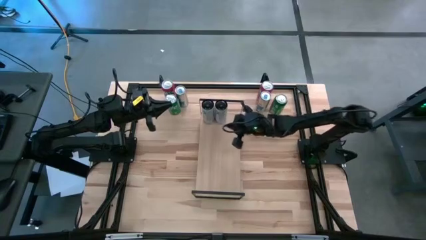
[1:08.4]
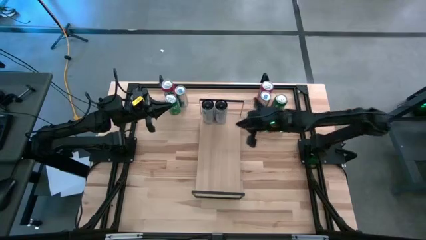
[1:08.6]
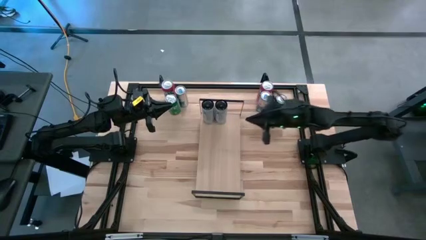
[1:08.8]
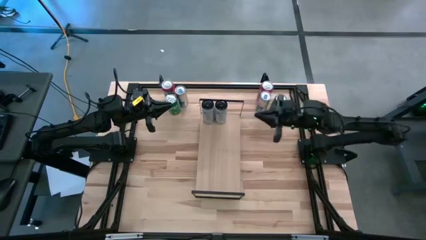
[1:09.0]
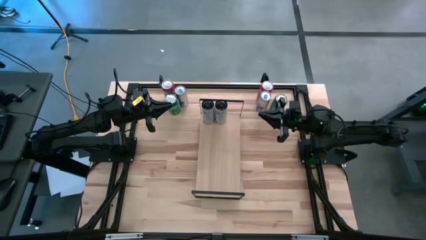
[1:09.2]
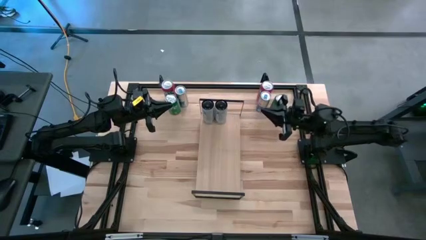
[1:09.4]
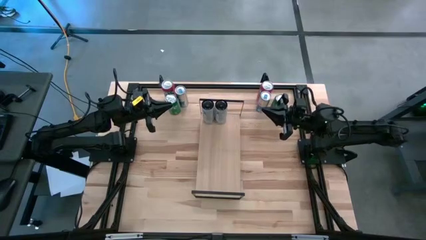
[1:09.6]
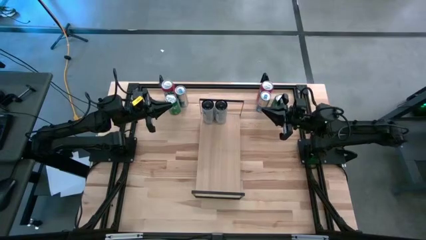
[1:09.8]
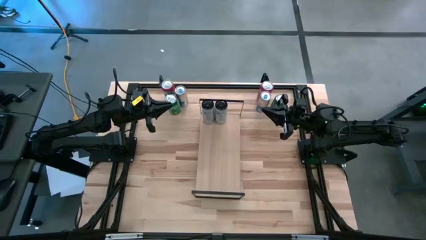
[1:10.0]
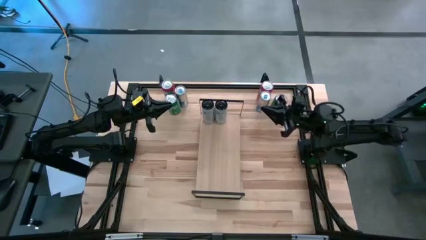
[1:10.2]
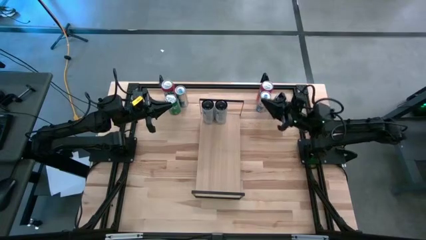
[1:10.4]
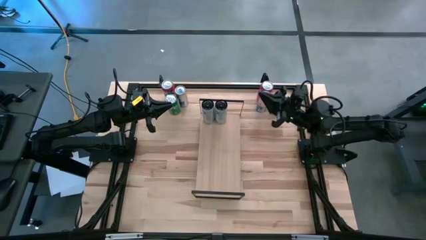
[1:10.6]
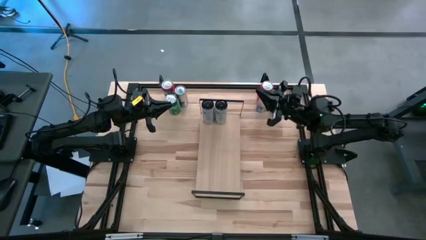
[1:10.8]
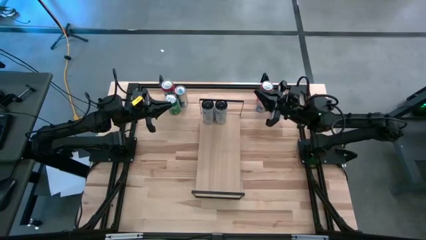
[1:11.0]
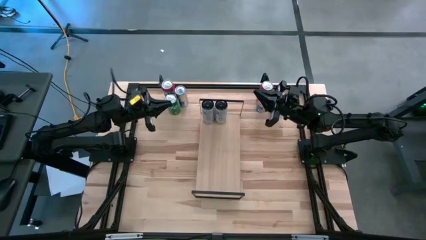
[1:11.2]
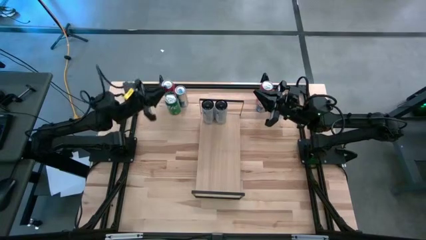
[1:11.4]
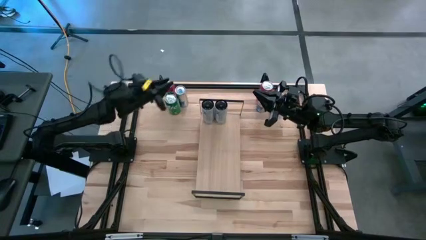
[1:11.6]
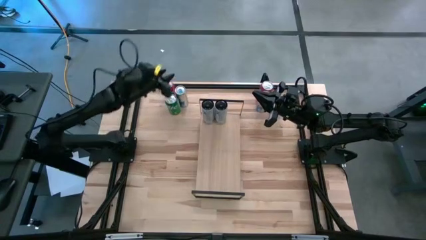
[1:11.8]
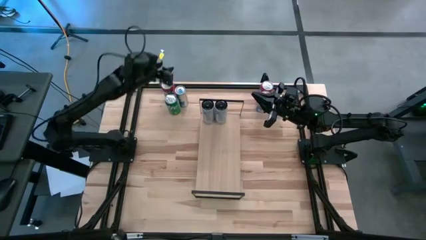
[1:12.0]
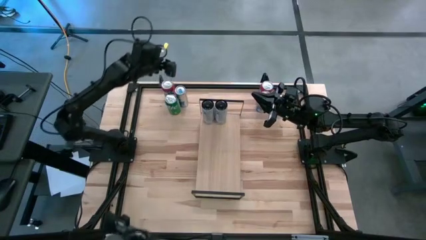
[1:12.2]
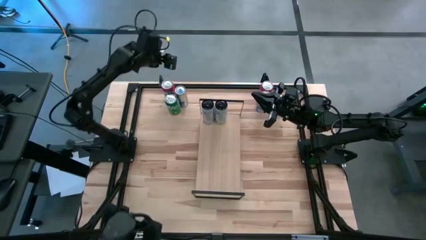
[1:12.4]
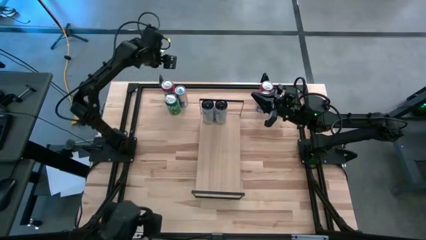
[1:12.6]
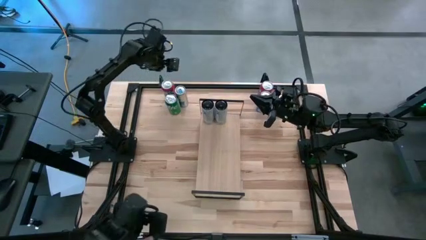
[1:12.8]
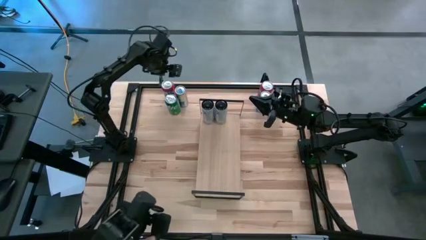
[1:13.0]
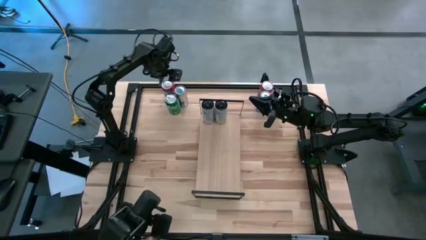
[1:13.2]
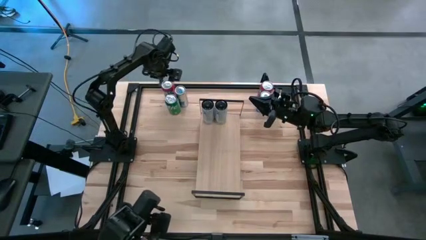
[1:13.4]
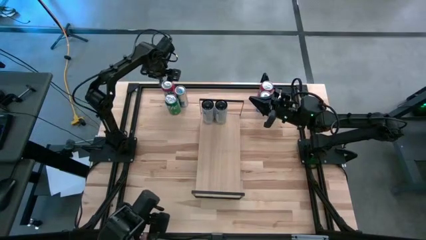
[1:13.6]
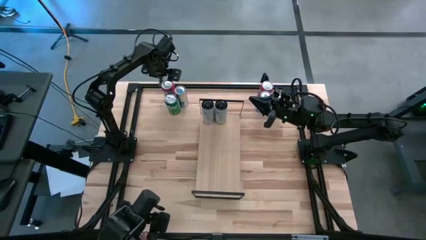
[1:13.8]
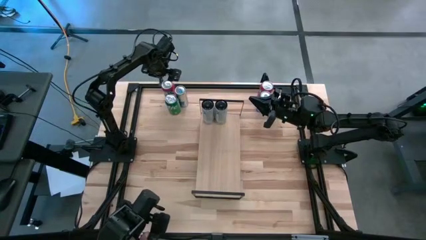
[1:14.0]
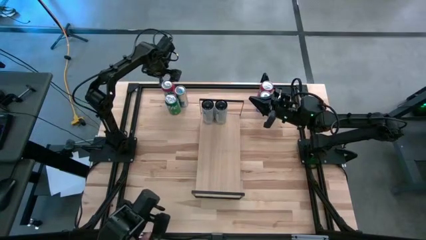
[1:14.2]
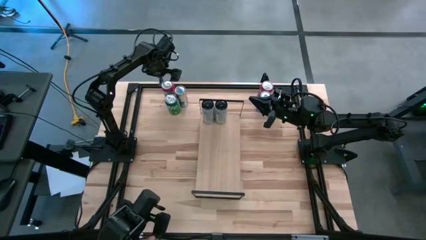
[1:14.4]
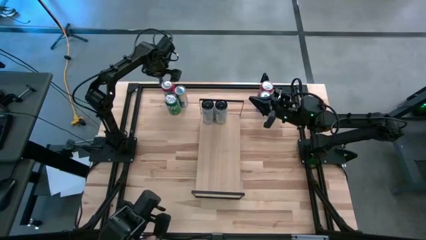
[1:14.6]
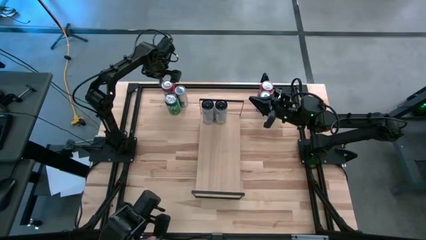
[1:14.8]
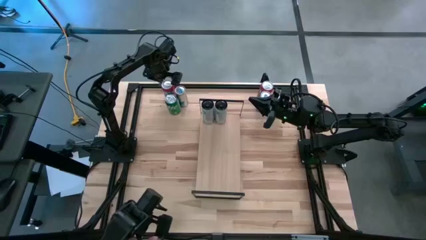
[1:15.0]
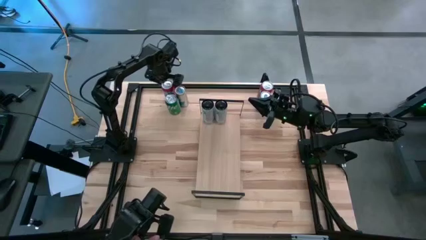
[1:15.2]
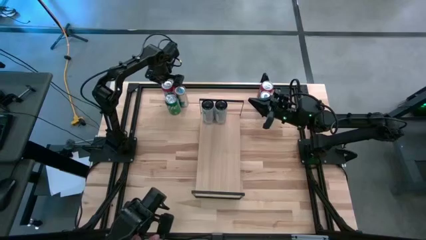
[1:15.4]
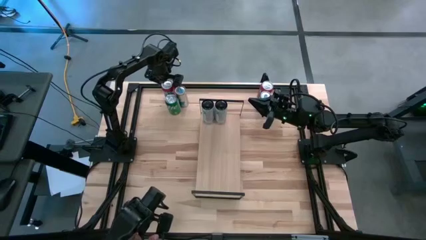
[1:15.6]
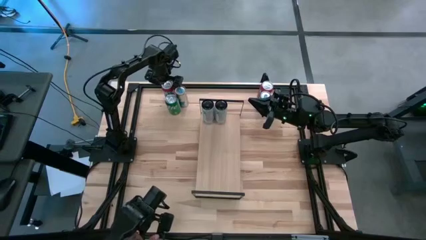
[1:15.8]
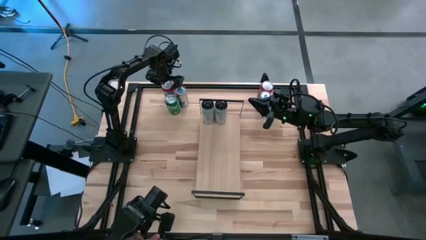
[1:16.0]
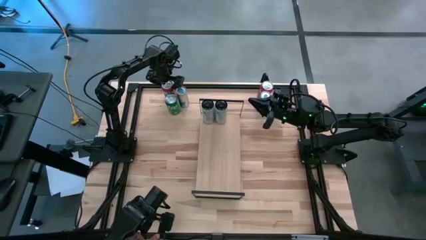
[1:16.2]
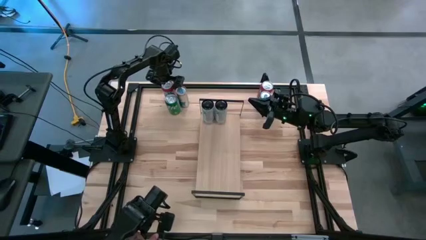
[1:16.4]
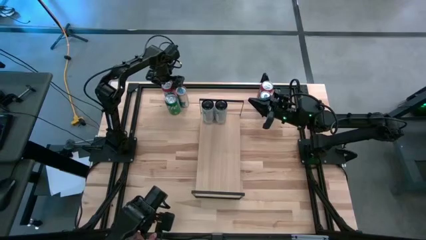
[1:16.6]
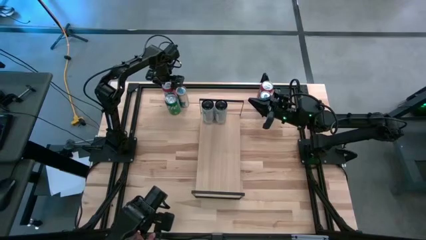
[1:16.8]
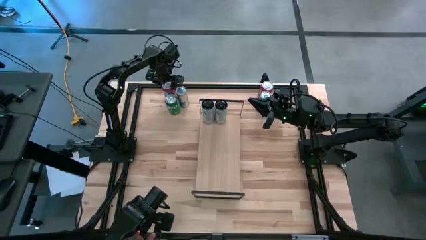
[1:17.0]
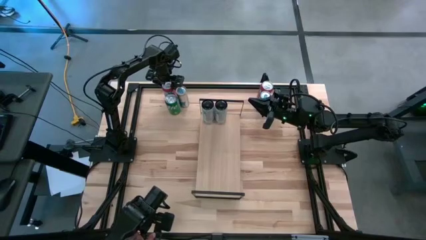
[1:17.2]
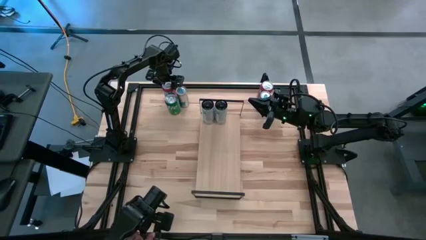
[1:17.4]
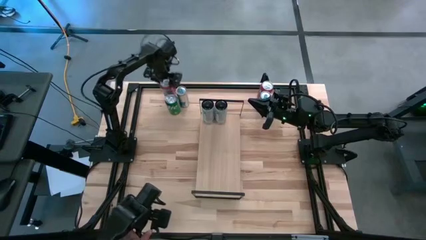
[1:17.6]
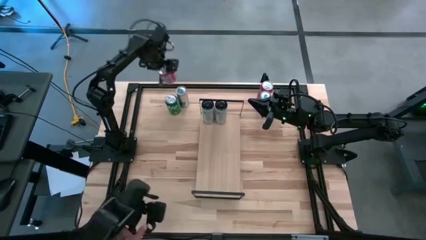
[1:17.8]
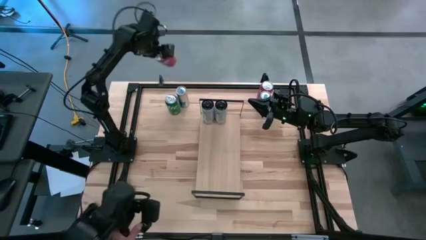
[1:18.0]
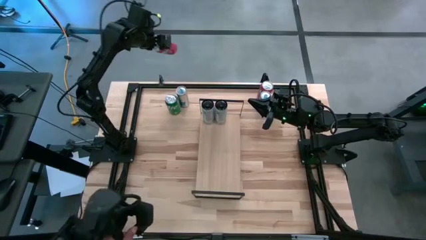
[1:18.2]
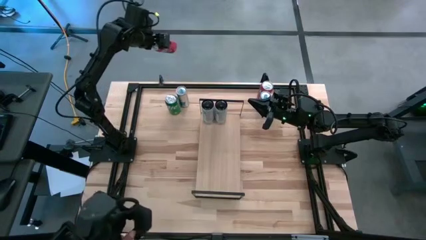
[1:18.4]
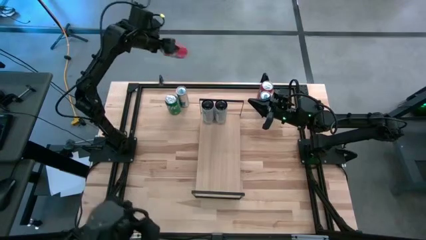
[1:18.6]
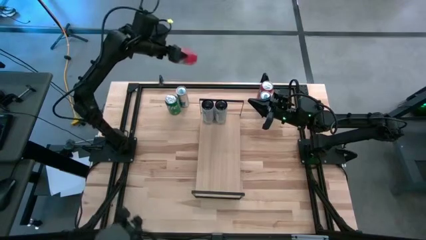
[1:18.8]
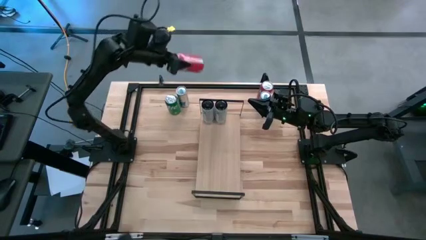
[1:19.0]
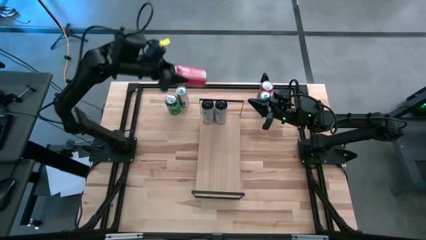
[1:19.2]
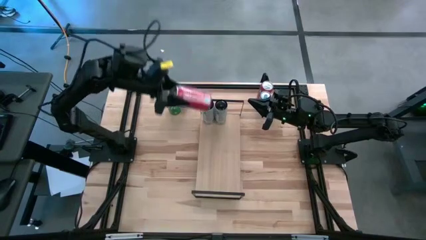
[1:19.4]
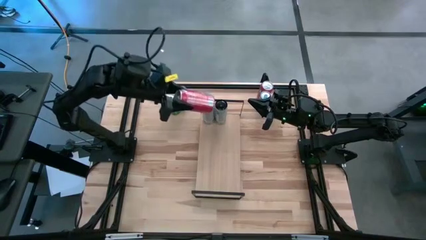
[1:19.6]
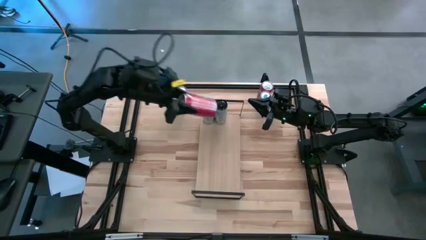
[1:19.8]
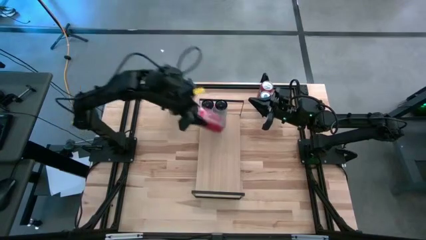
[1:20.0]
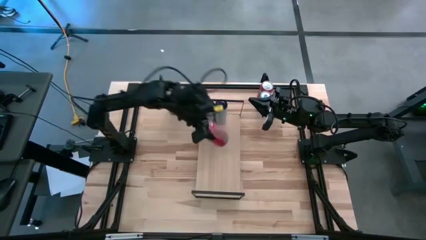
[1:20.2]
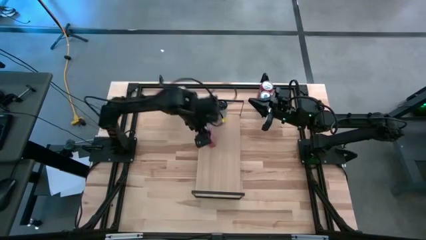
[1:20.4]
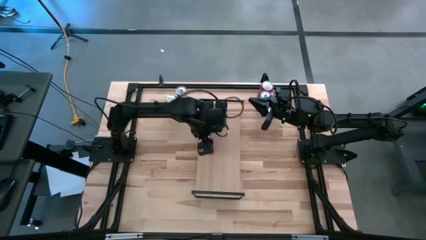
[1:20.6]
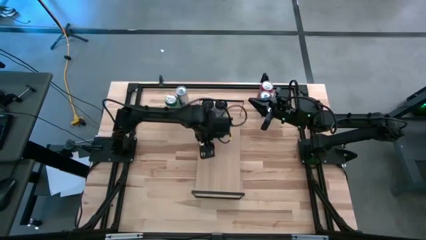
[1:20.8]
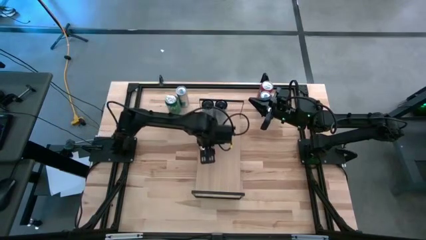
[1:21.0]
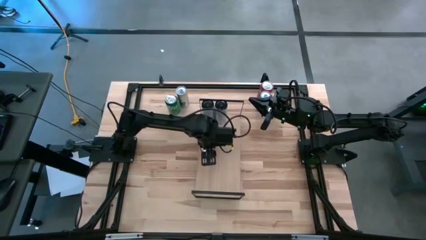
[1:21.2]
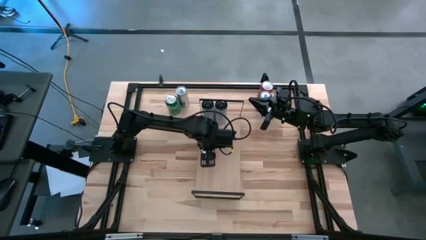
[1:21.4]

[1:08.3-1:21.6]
Task: Place canned beverage on shelf
Put the left red soda can on the shelf
